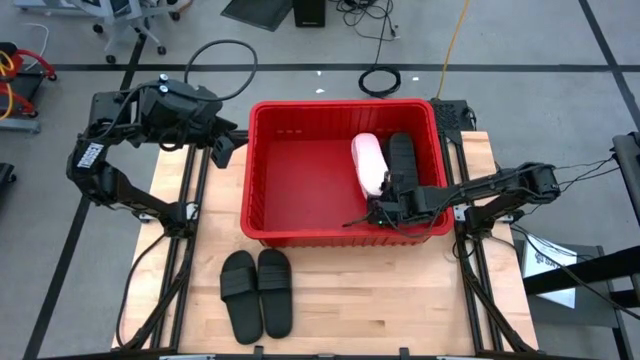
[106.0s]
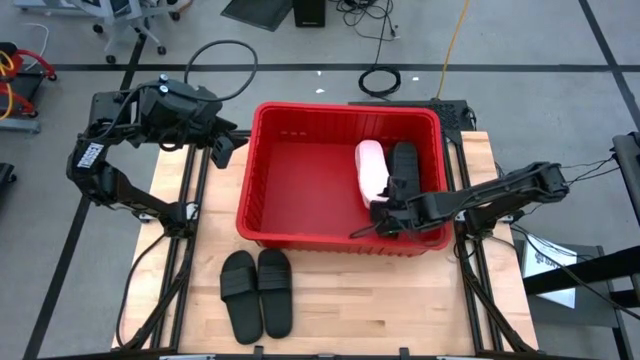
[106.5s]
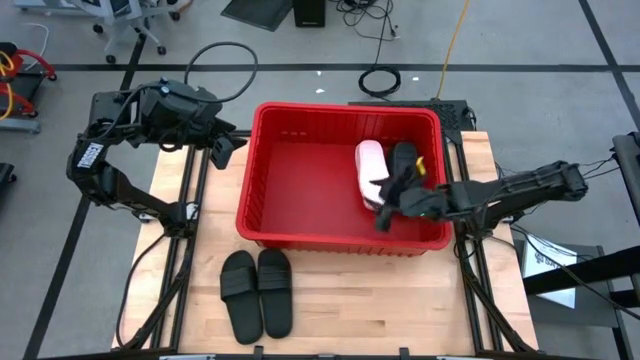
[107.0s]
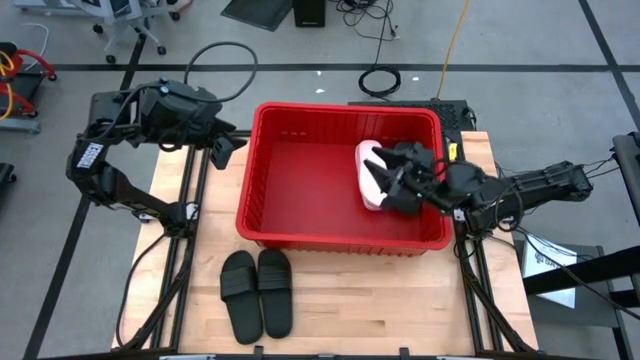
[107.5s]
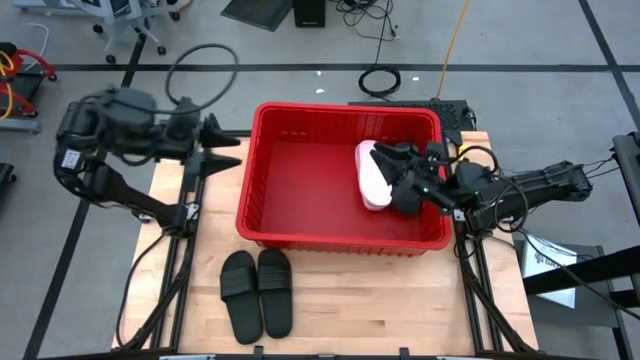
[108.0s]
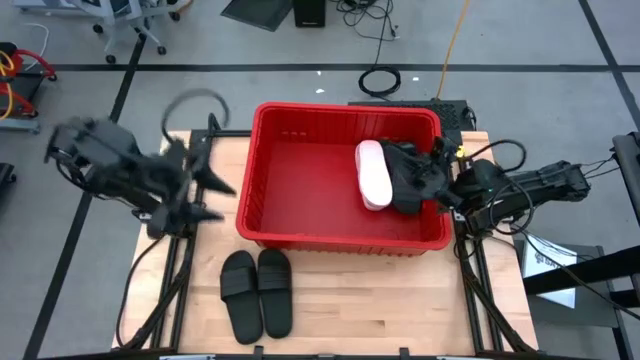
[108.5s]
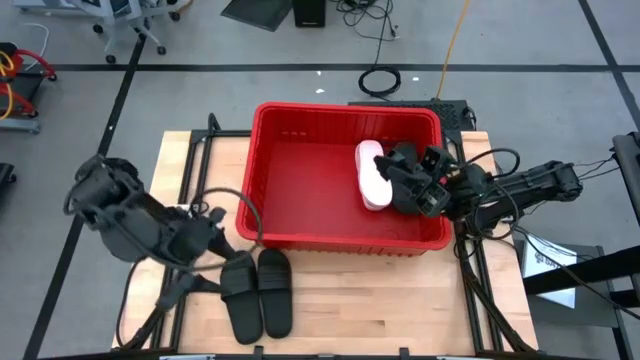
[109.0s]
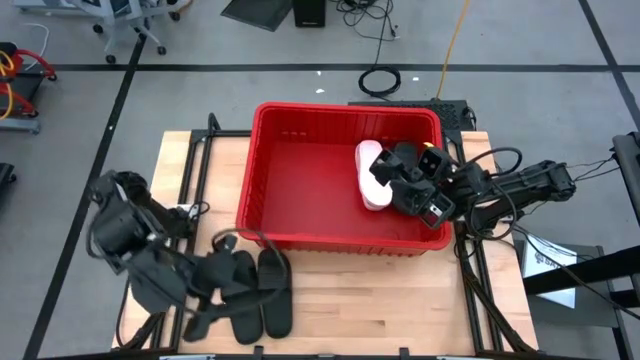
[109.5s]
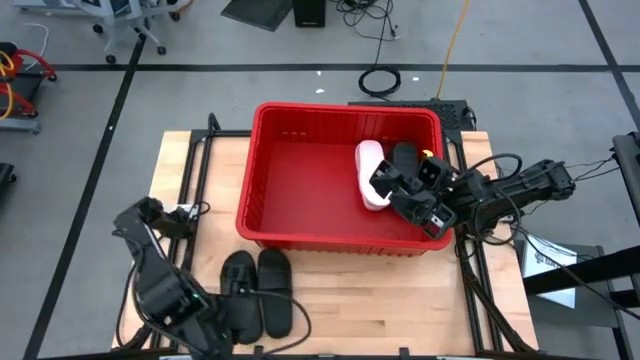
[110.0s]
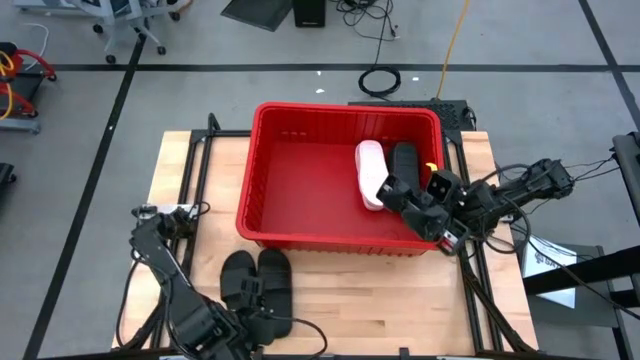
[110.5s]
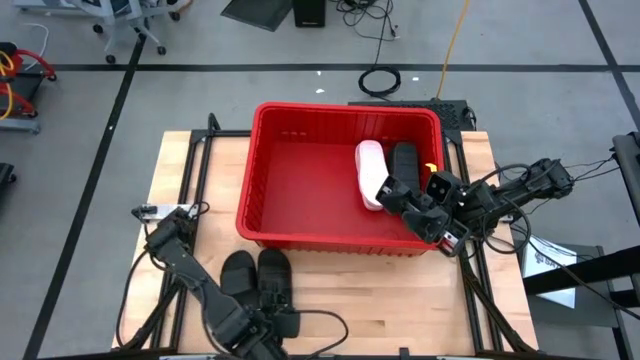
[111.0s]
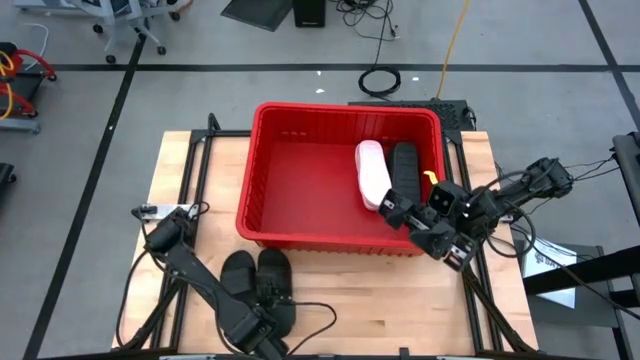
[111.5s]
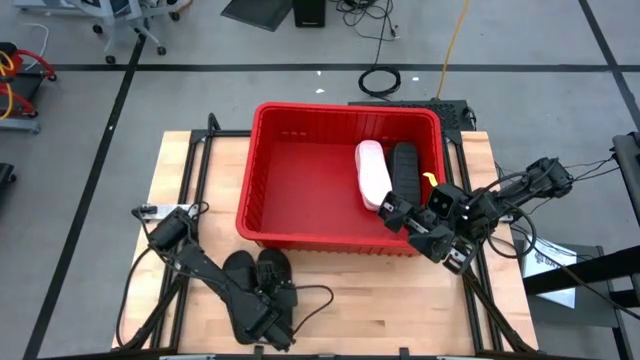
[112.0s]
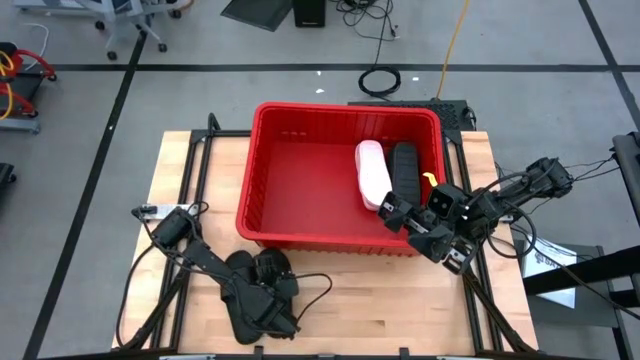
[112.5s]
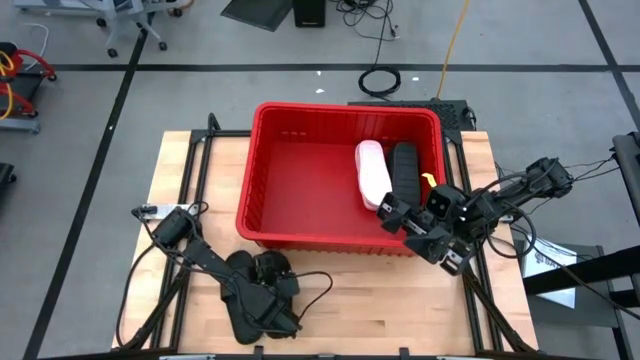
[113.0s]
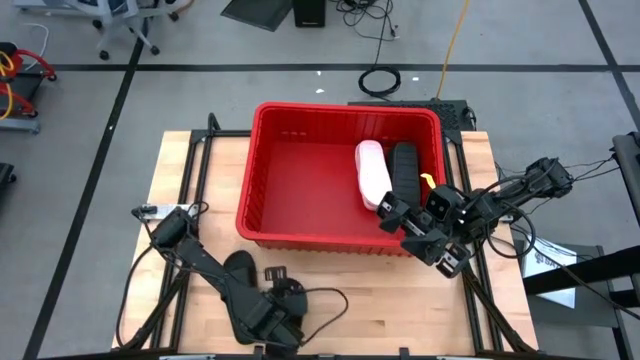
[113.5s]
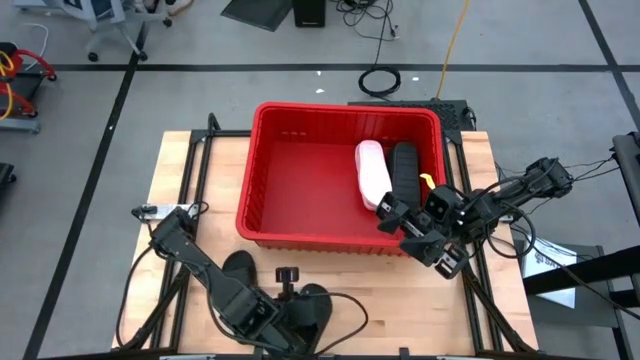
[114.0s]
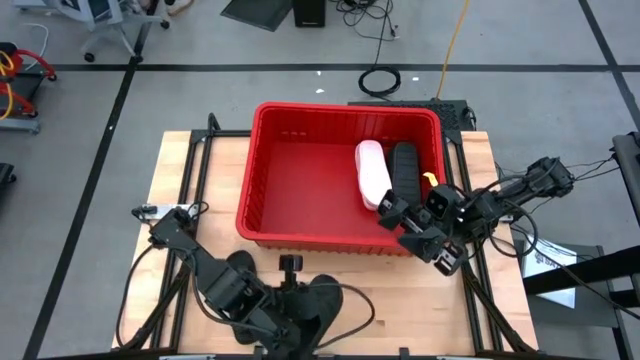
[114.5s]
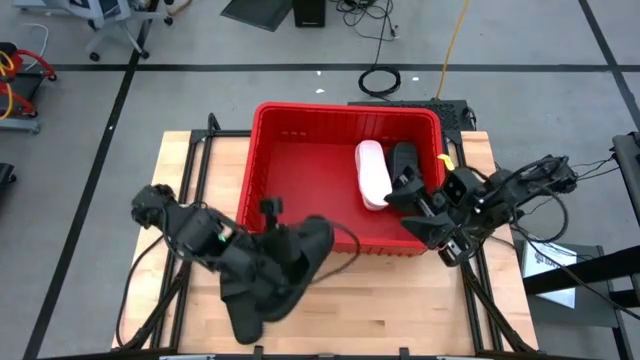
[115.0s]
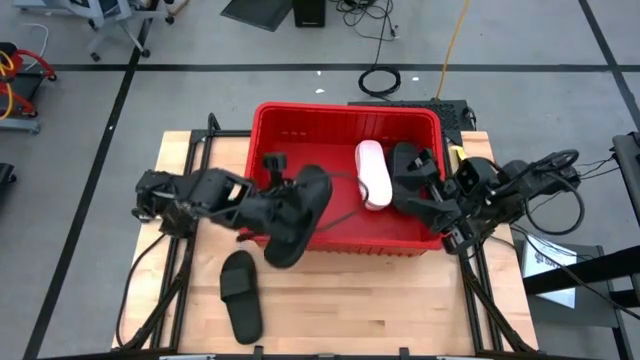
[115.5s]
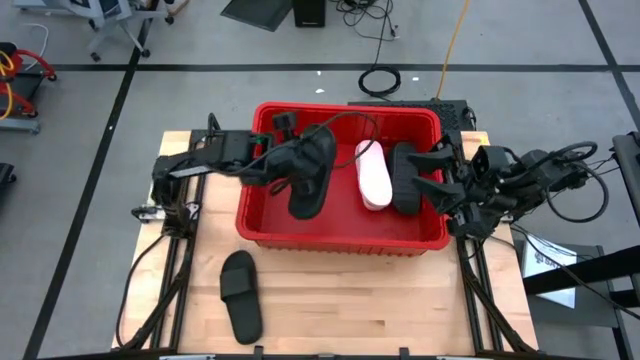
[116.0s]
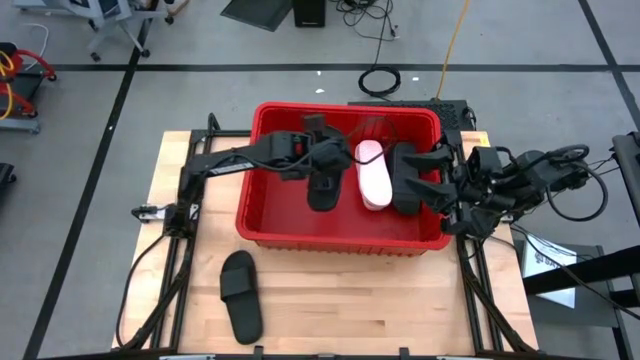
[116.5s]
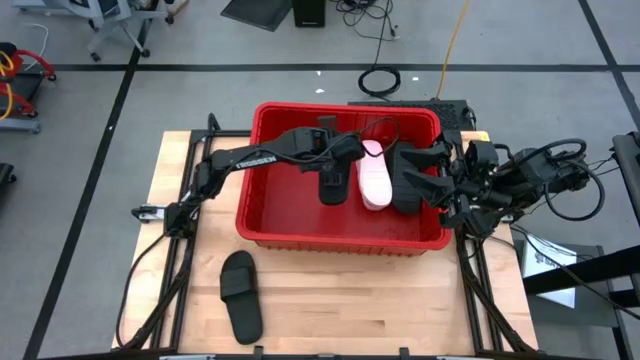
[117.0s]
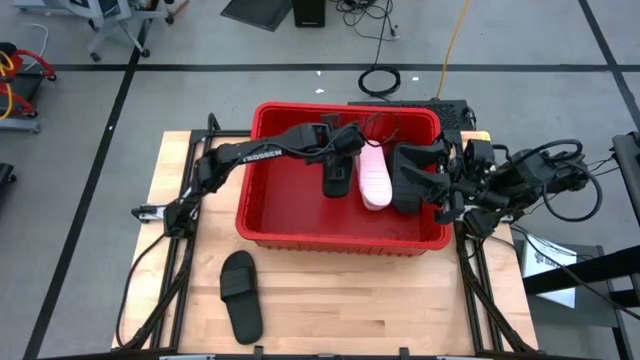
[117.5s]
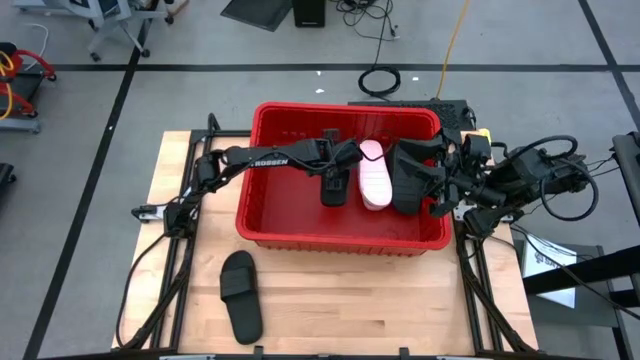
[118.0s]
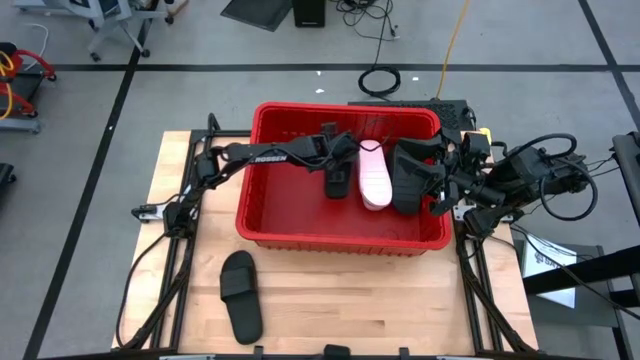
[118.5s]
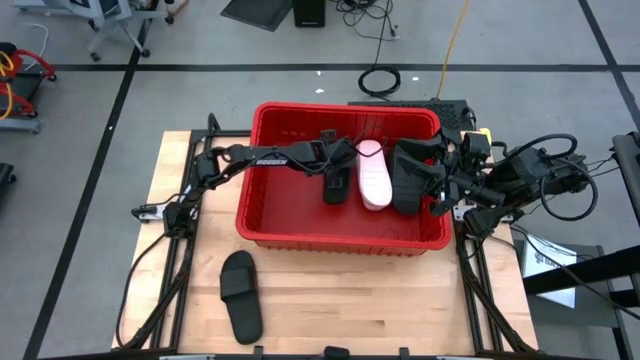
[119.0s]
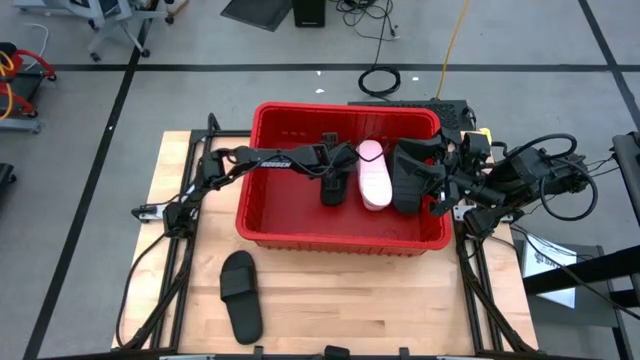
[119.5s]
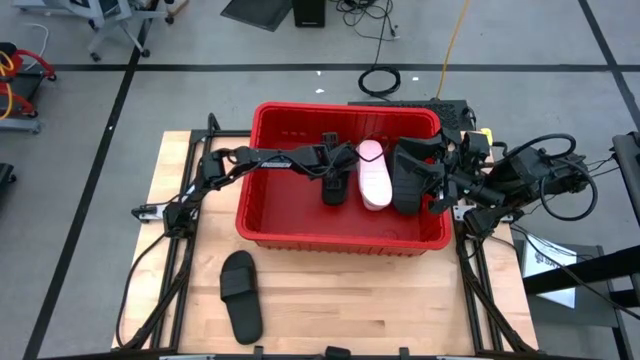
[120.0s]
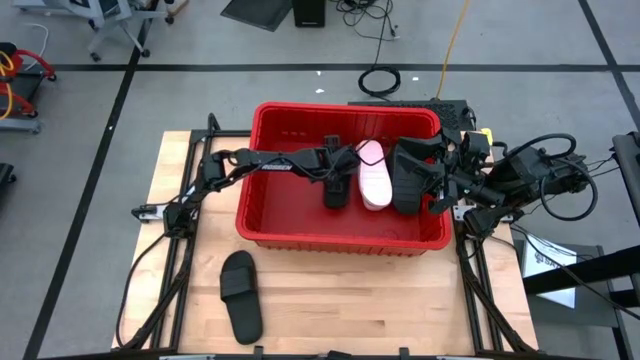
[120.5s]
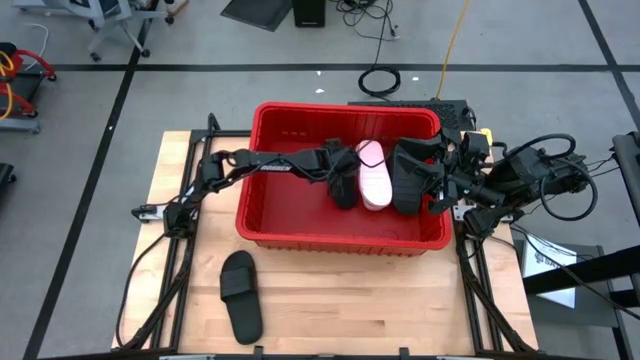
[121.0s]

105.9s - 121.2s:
Task: Pick and place slides into bin
Put the black slide into the red container

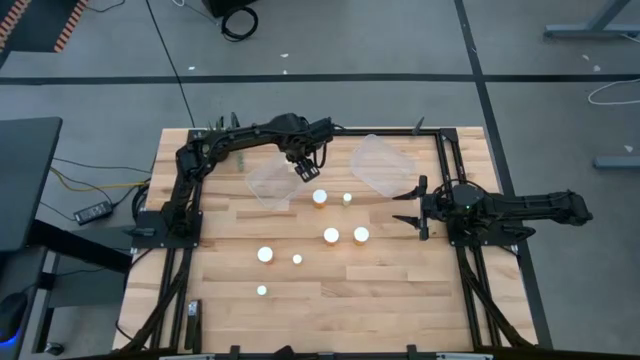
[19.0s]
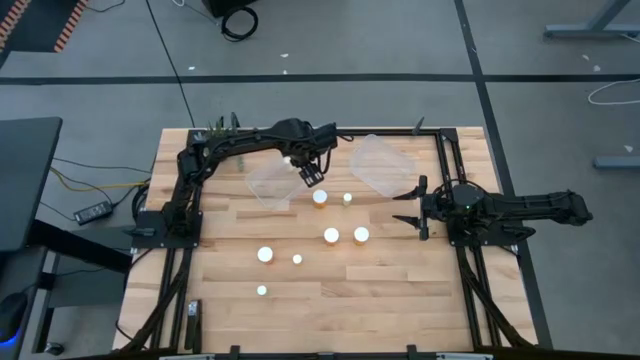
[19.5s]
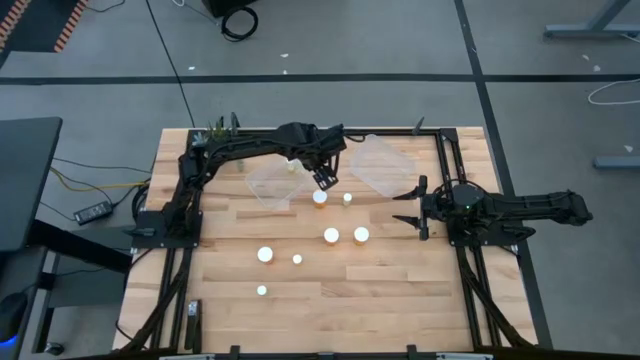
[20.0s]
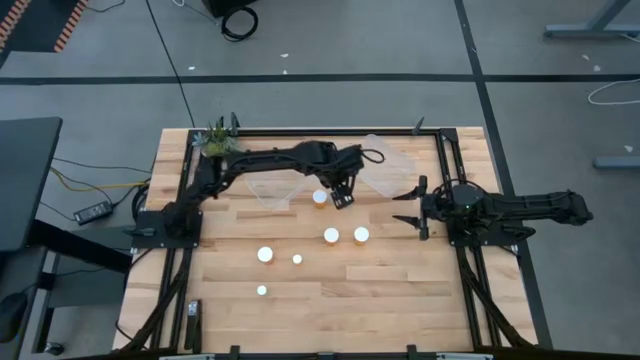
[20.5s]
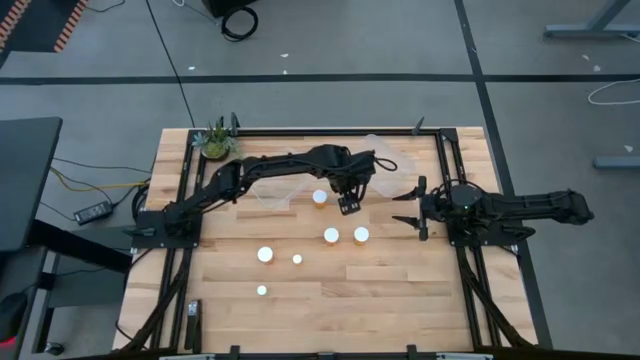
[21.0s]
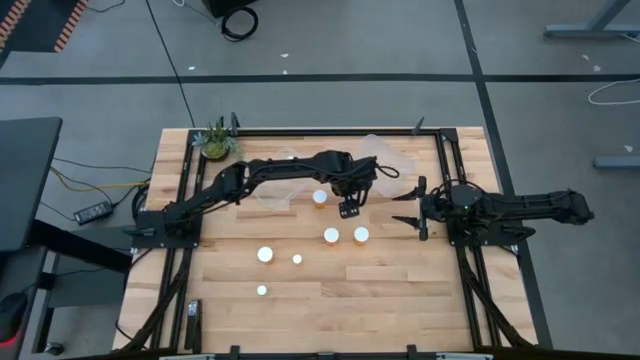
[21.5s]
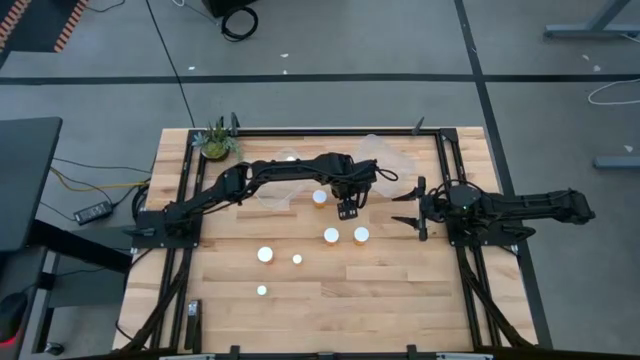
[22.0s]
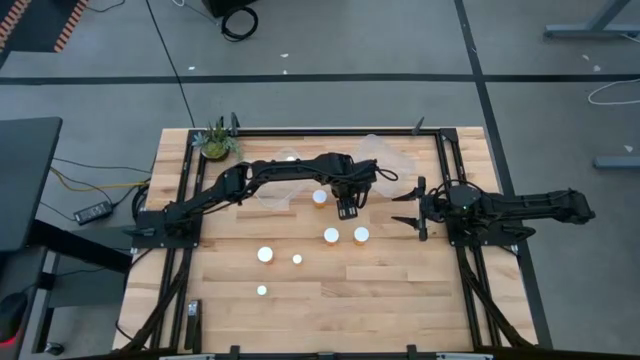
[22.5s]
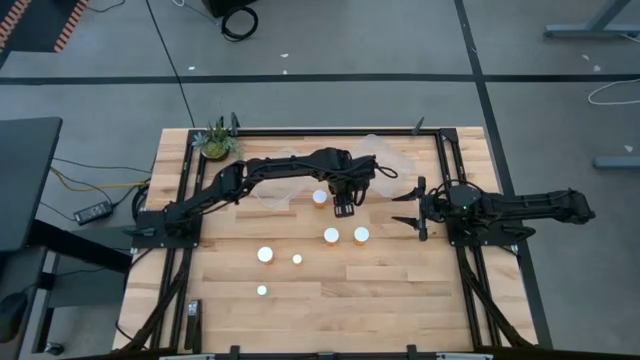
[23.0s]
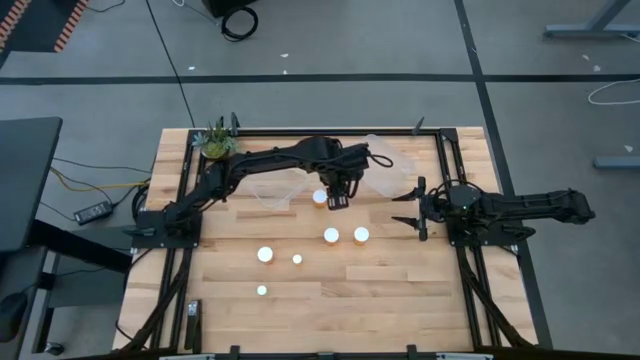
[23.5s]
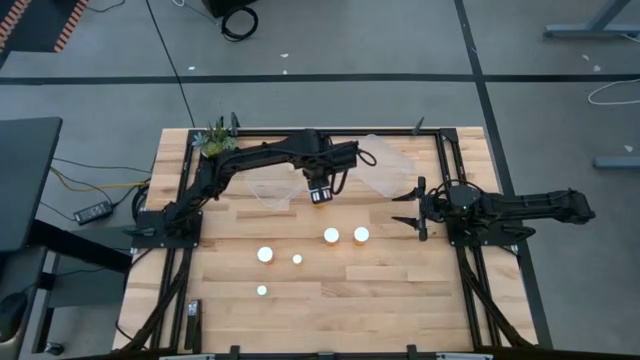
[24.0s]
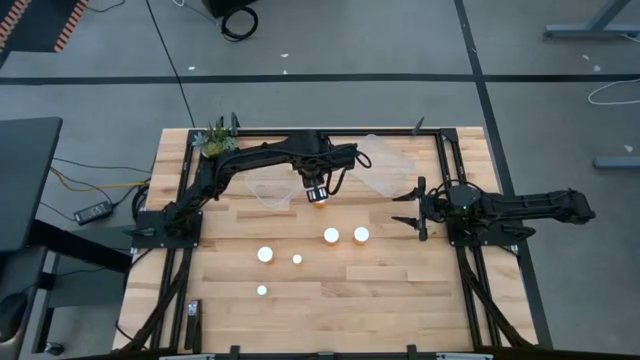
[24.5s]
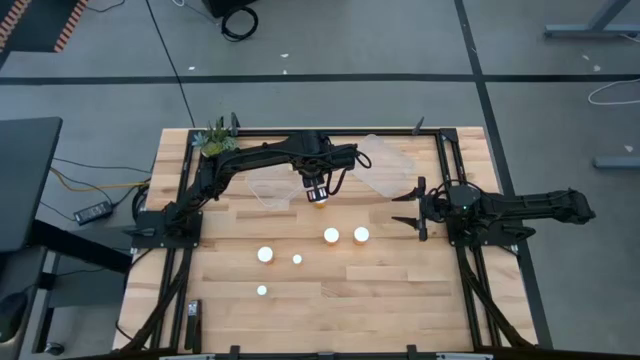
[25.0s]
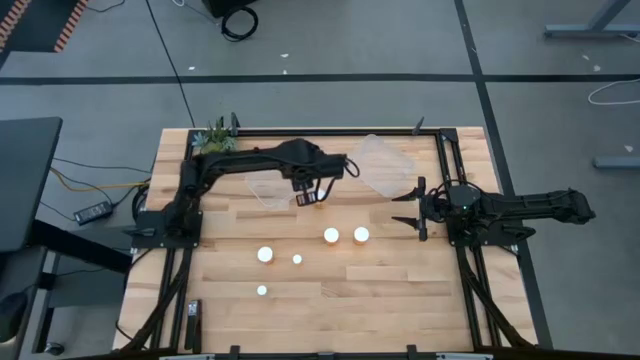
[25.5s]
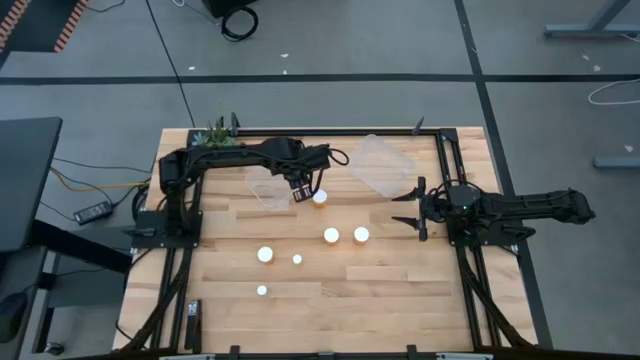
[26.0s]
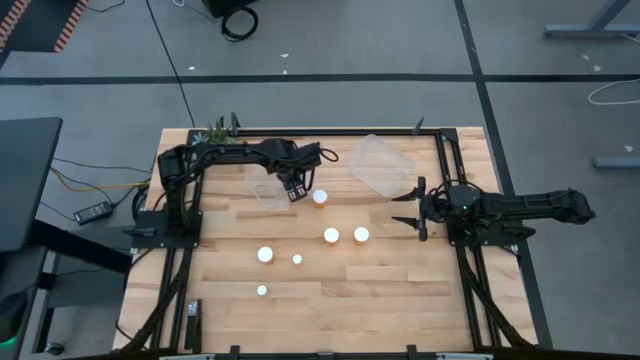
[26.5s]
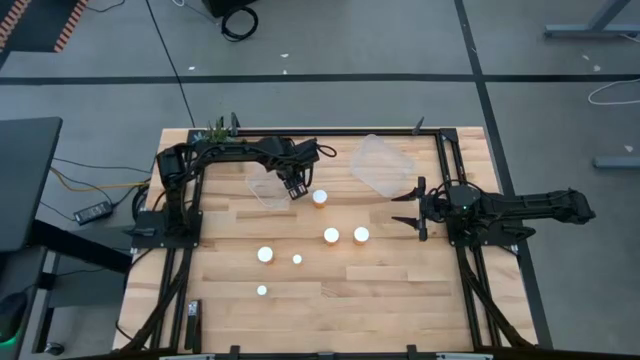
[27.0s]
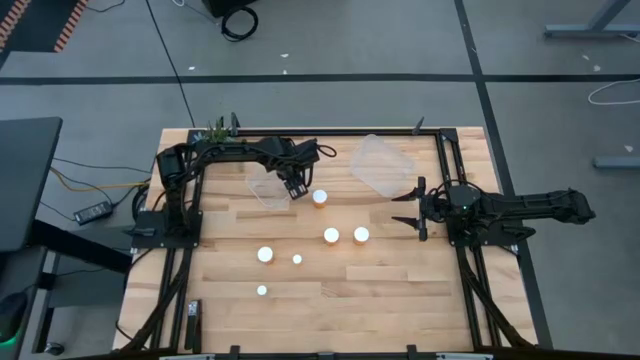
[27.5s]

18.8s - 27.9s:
Task: Pick and place medicine bottles into bin by pill shape (circle, oval)
Put the top small yellow pill bottle into the left transparent bin
